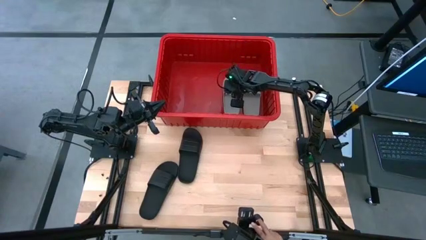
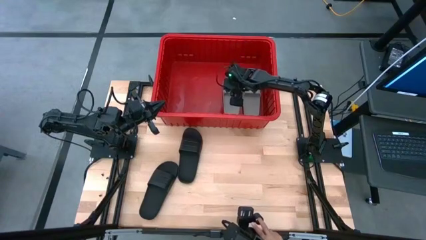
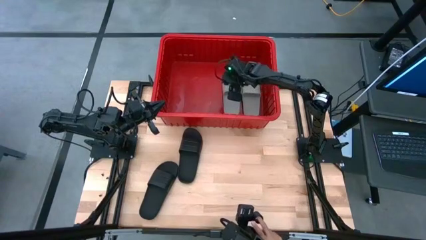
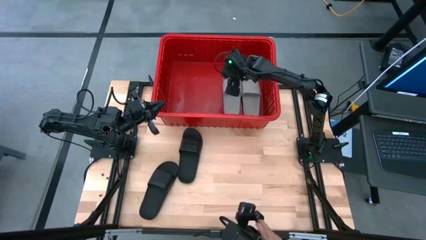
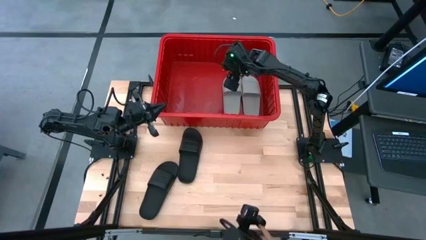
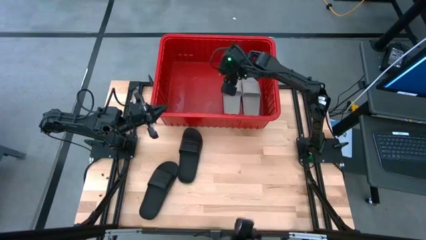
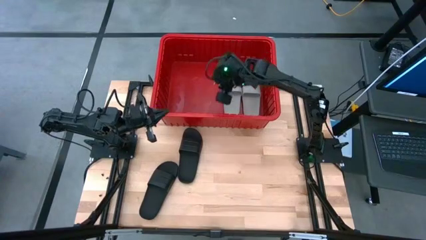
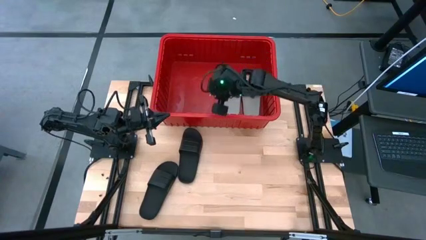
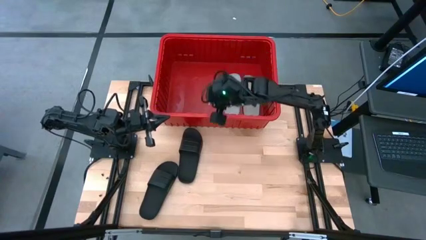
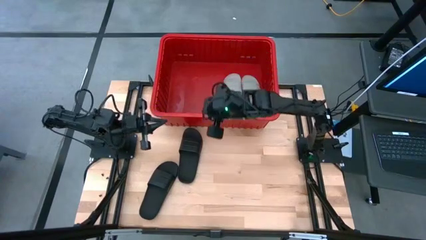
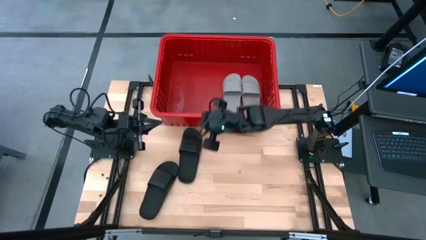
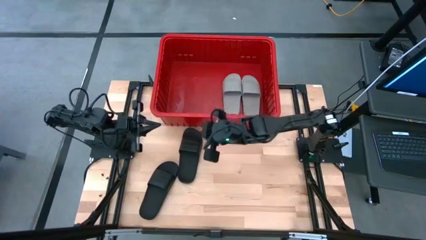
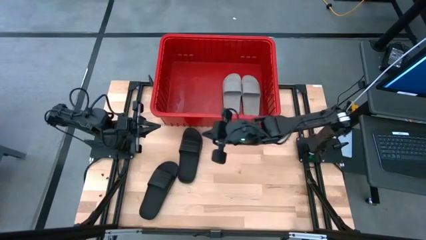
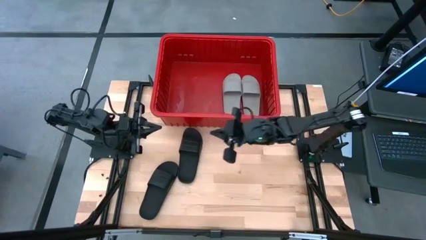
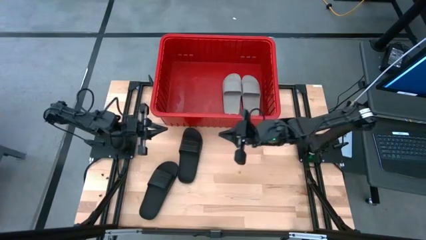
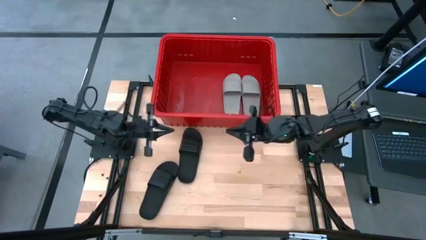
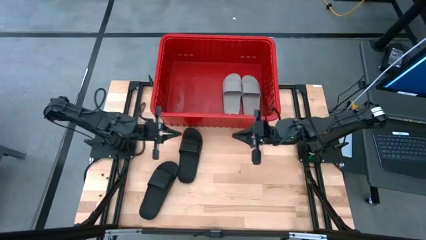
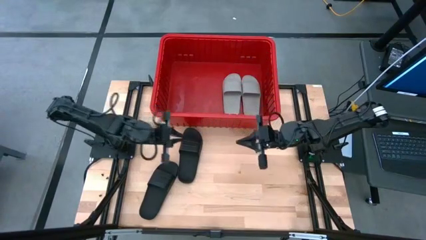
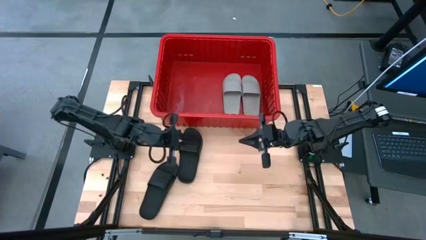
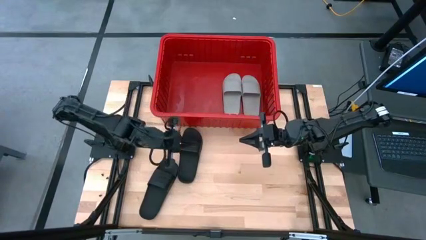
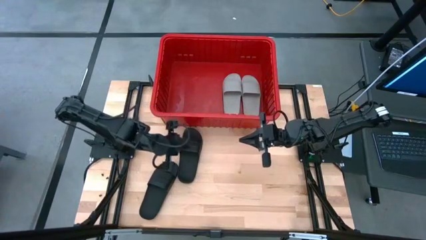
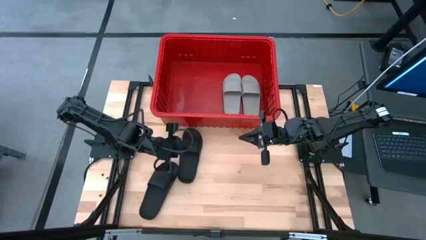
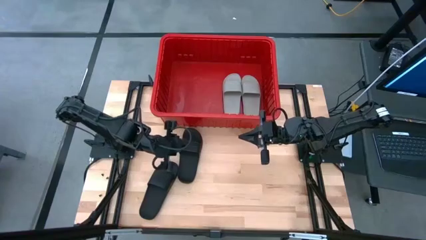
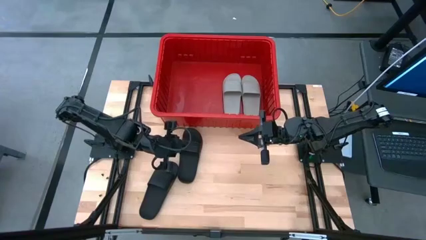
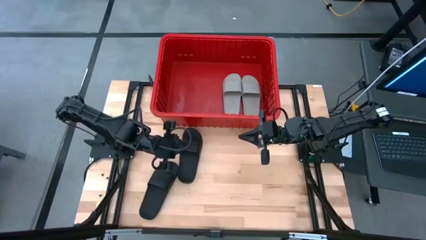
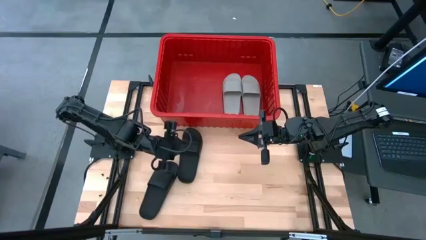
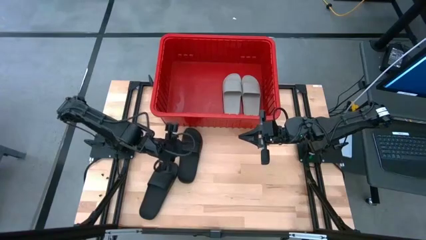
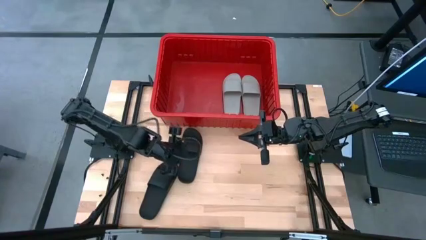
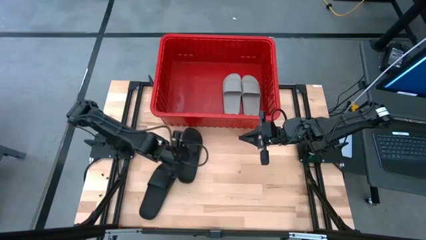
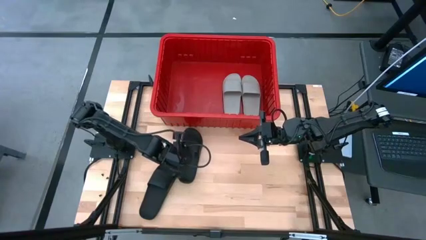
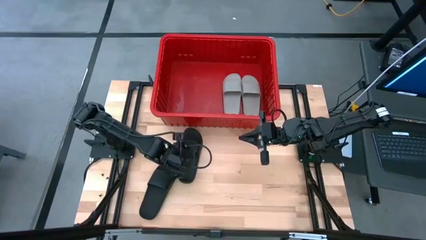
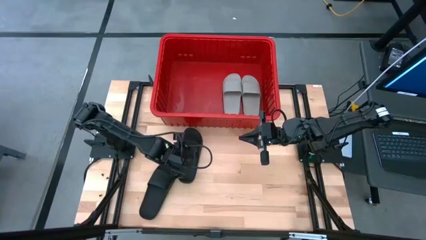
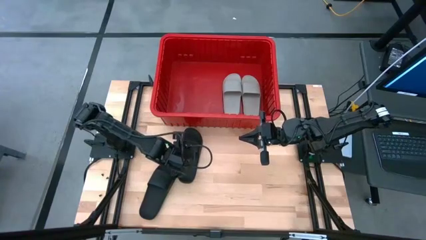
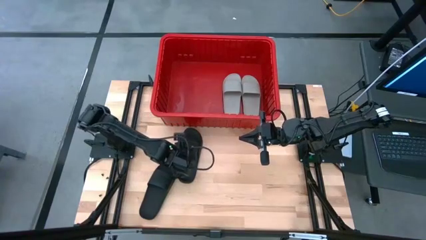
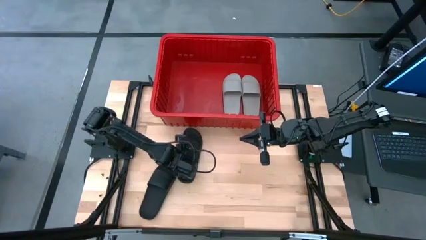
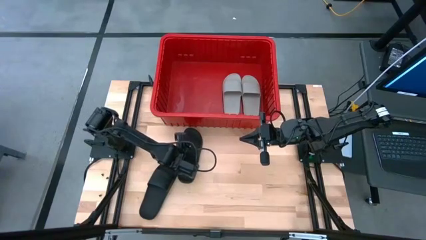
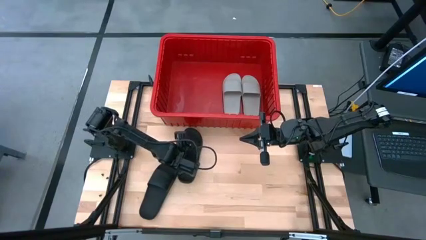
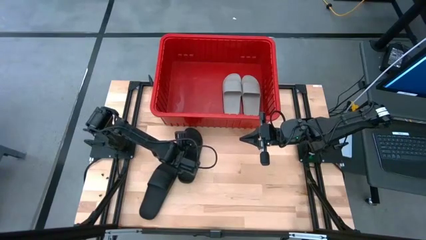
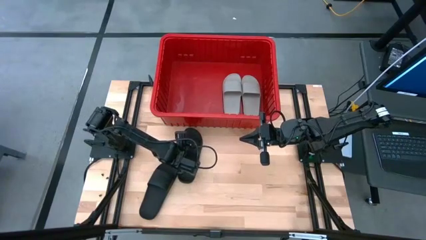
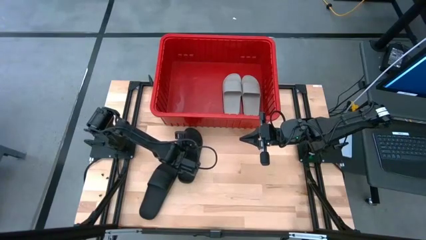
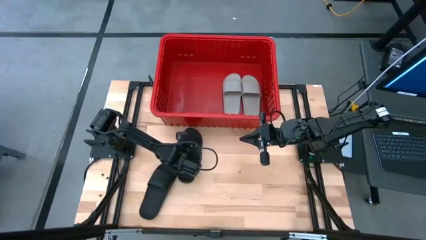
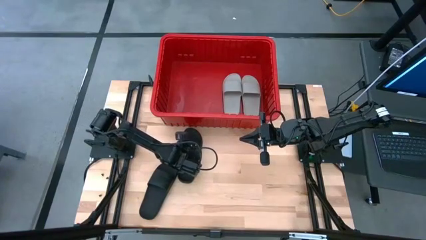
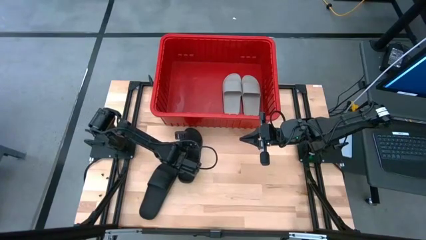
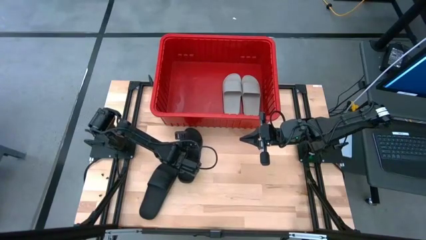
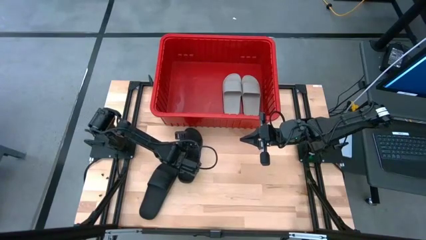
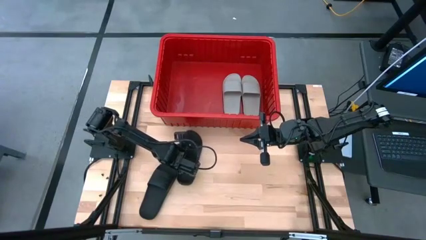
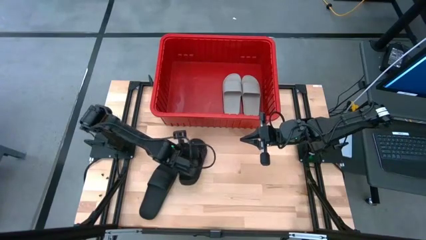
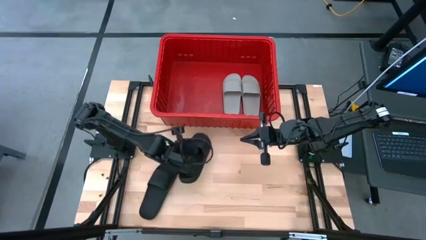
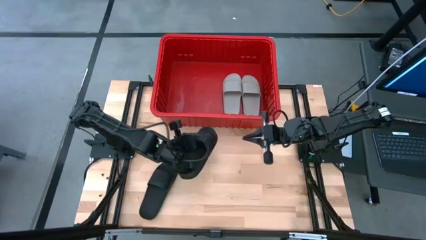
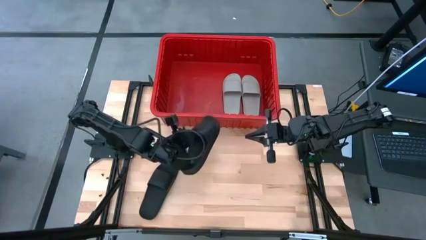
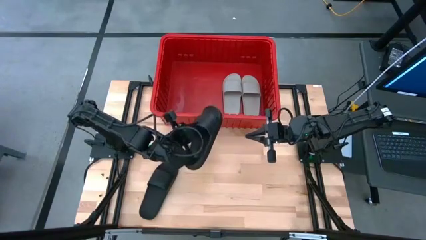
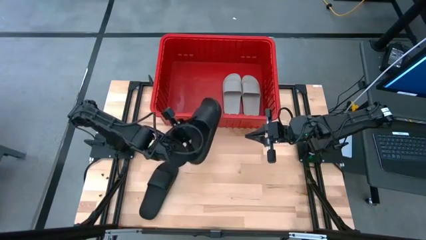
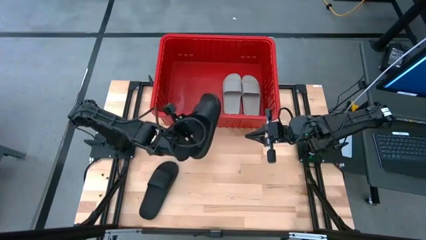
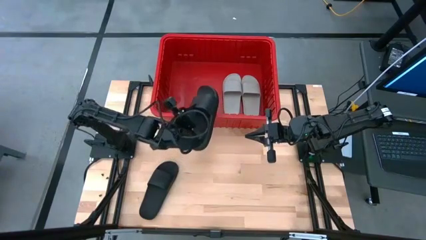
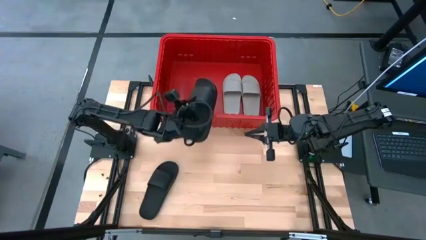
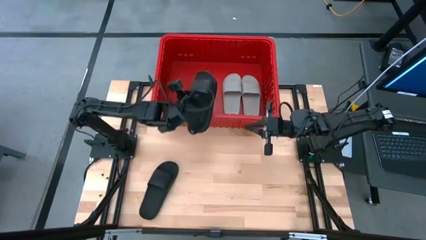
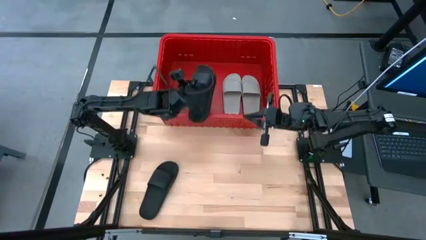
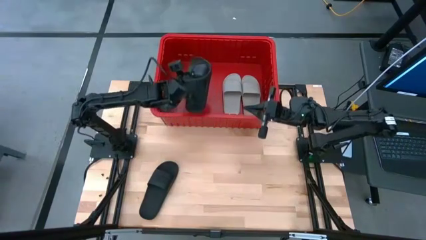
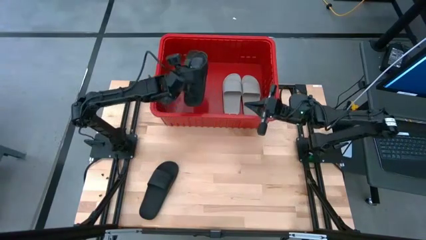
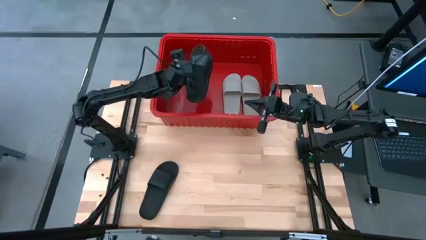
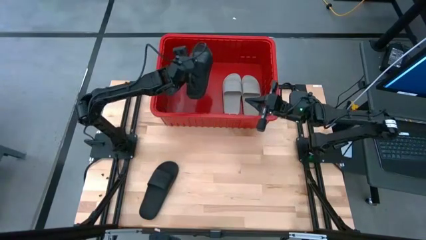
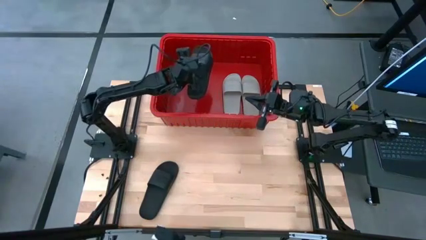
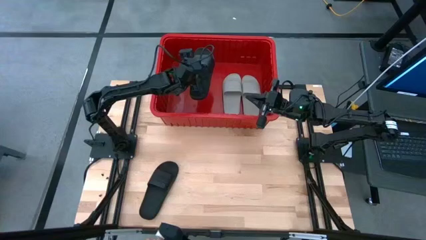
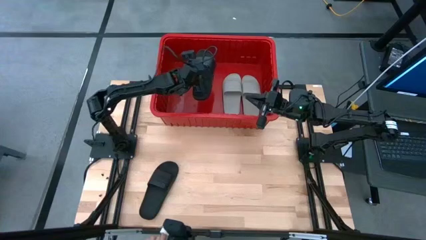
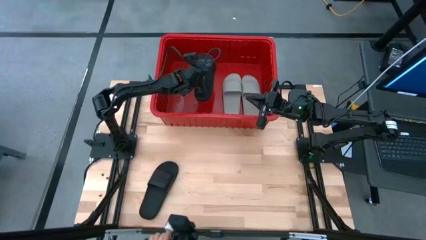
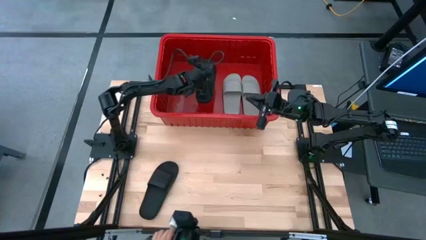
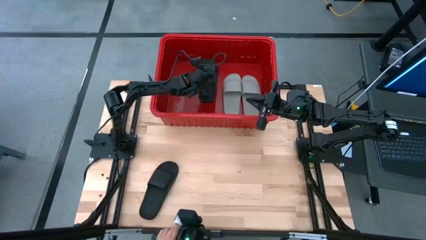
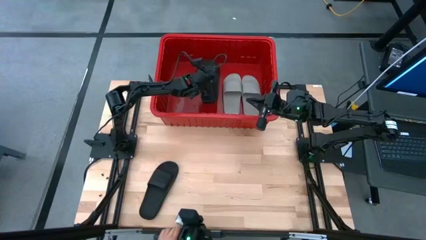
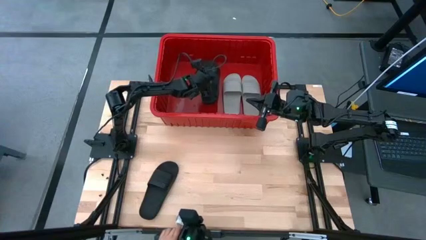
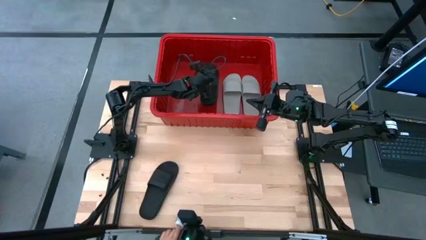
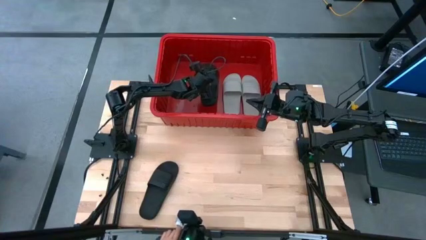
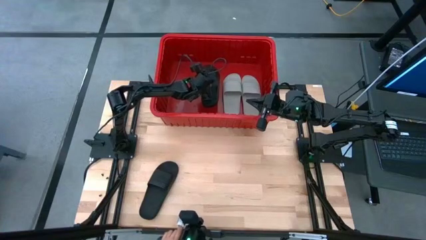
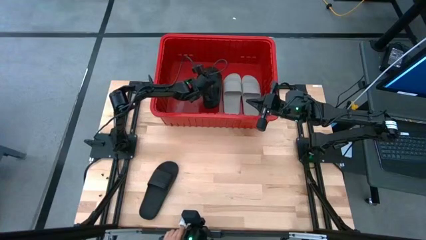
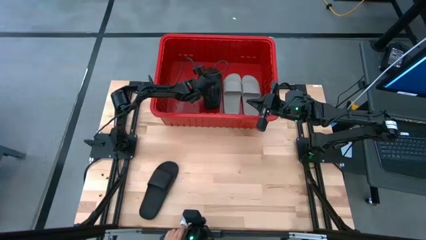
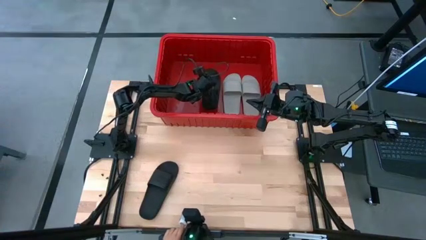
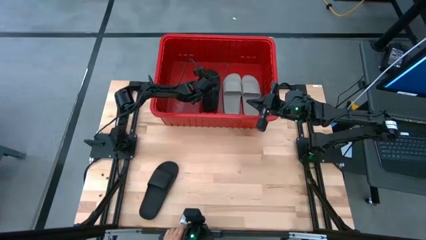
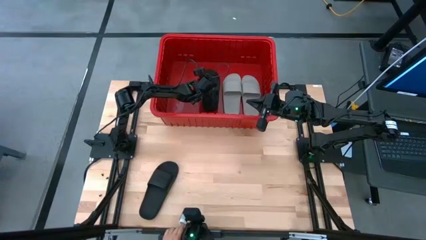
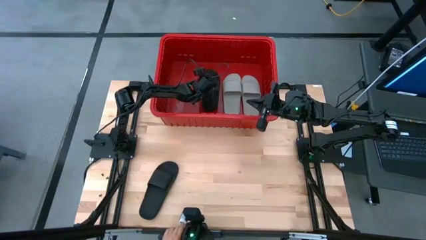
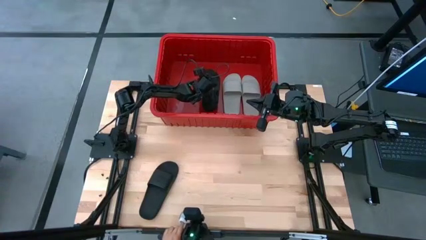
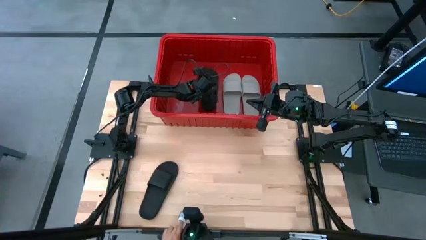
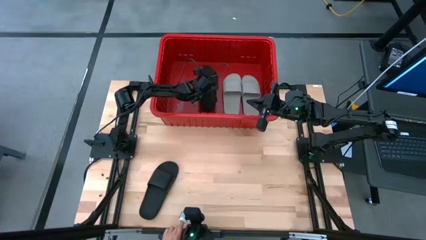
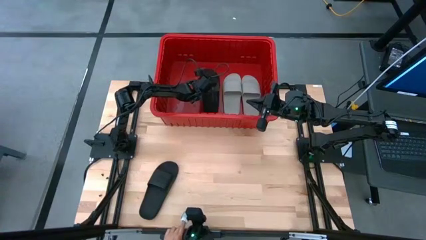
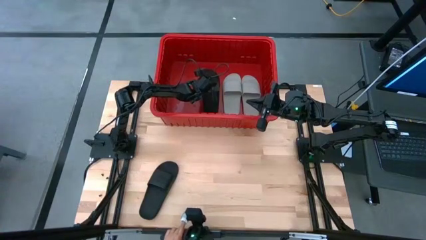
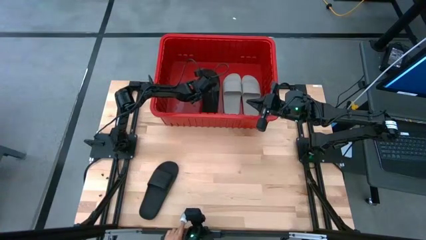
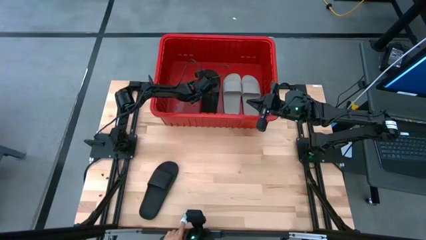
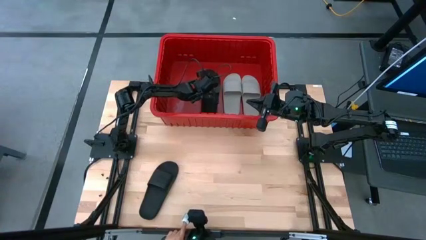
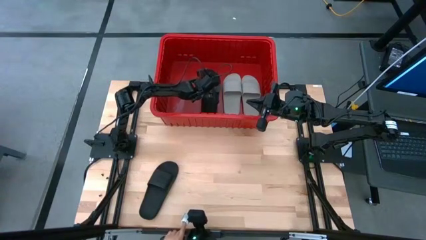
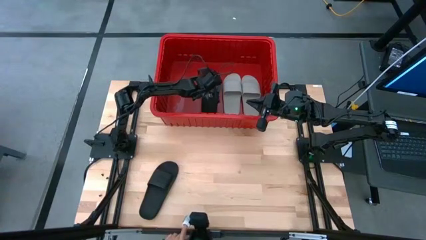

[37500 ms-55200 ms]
Task: Pick and place slides into bin
Put the top black slide into the red bin
